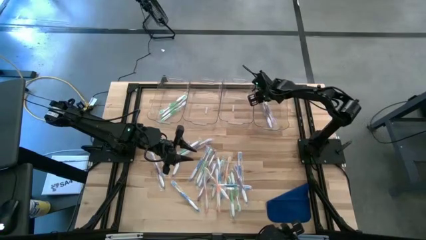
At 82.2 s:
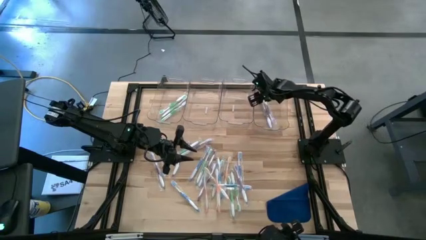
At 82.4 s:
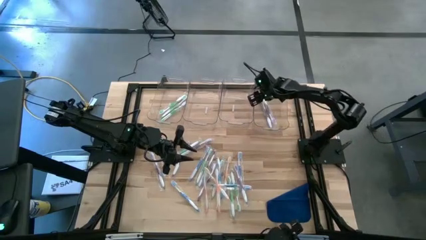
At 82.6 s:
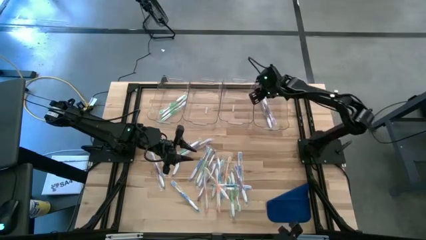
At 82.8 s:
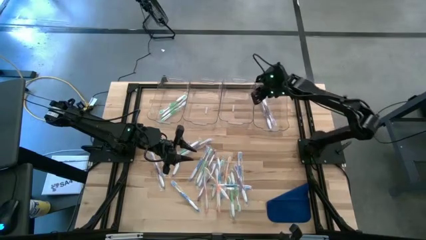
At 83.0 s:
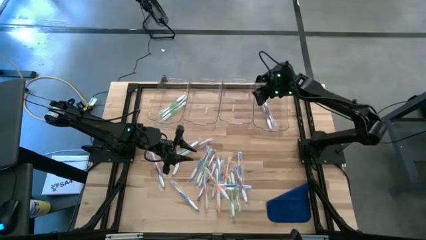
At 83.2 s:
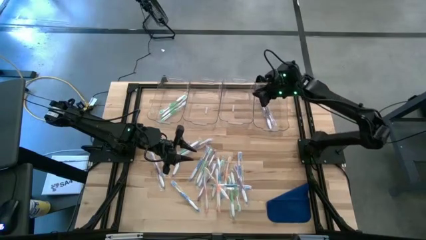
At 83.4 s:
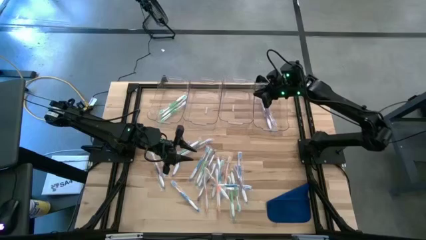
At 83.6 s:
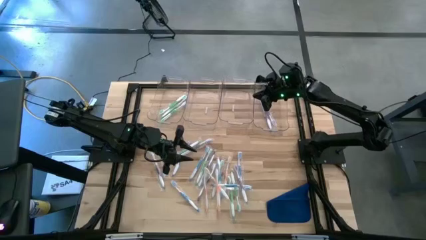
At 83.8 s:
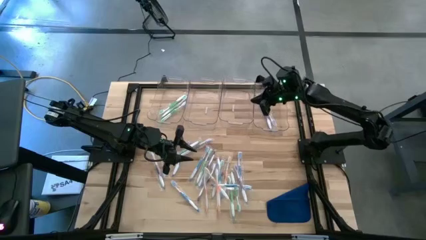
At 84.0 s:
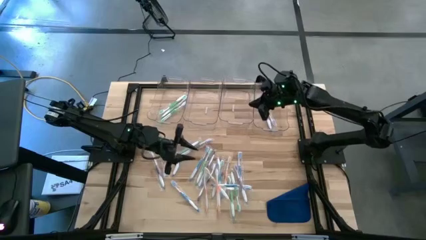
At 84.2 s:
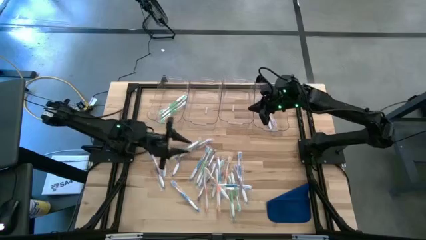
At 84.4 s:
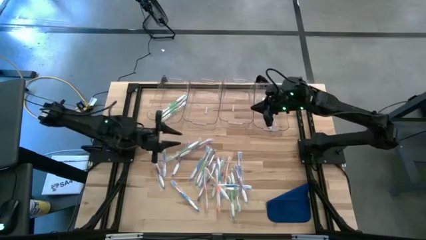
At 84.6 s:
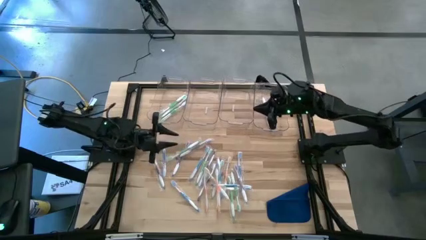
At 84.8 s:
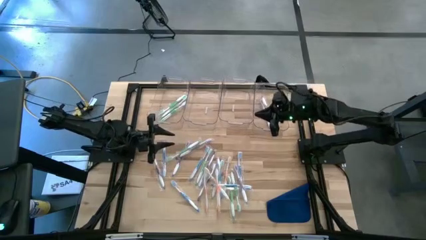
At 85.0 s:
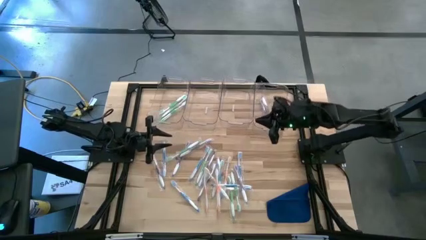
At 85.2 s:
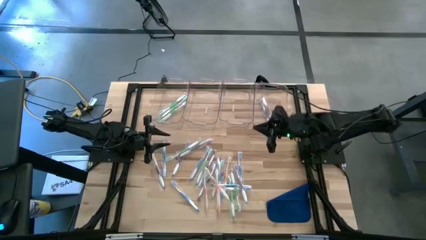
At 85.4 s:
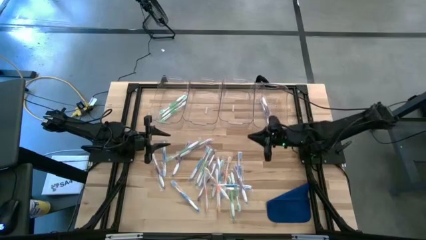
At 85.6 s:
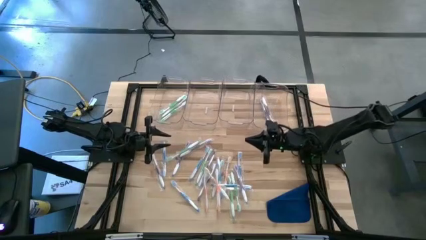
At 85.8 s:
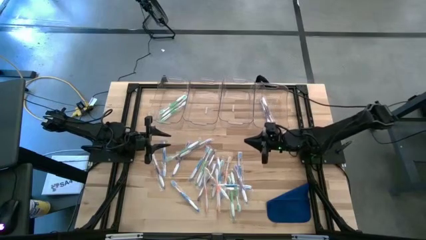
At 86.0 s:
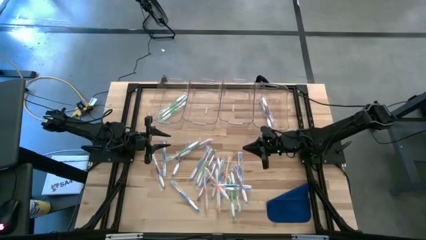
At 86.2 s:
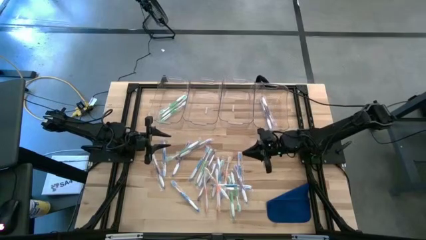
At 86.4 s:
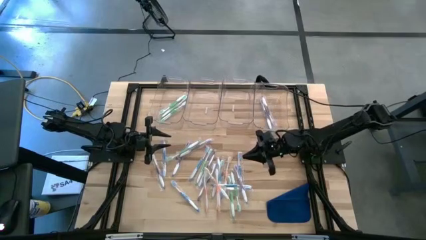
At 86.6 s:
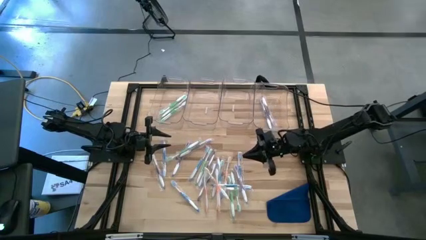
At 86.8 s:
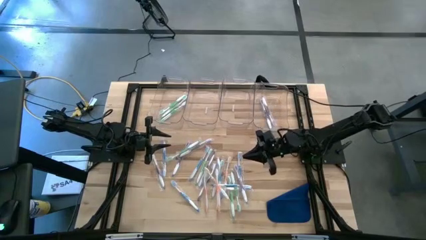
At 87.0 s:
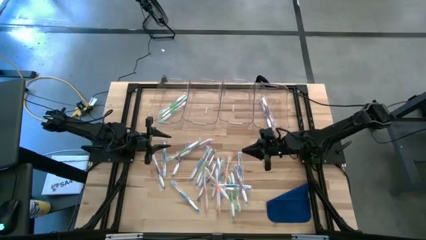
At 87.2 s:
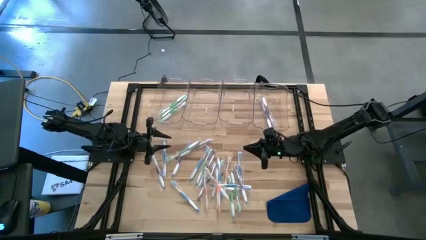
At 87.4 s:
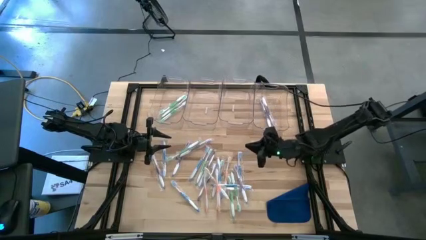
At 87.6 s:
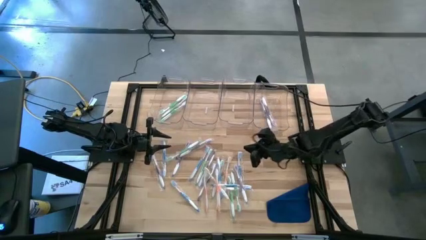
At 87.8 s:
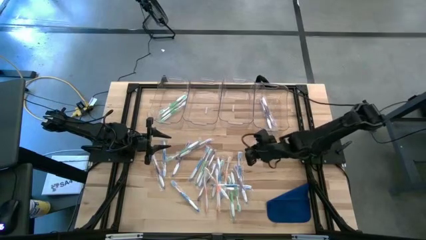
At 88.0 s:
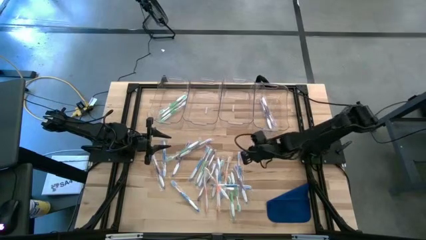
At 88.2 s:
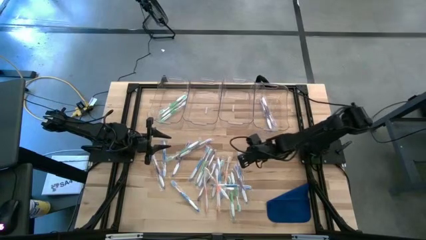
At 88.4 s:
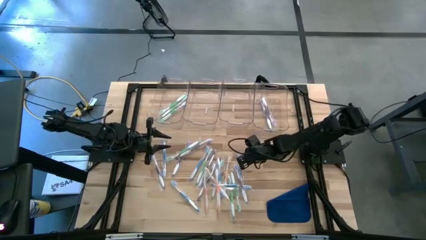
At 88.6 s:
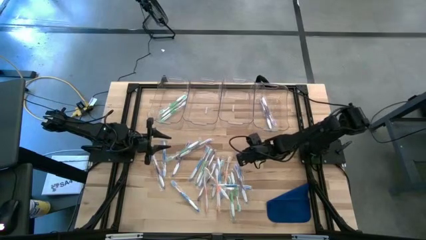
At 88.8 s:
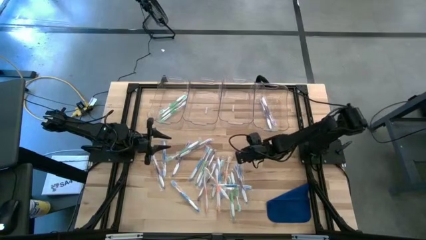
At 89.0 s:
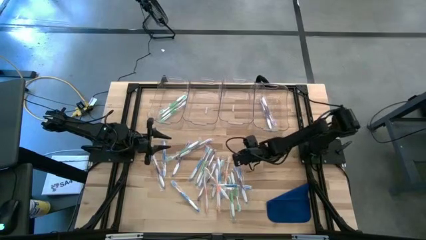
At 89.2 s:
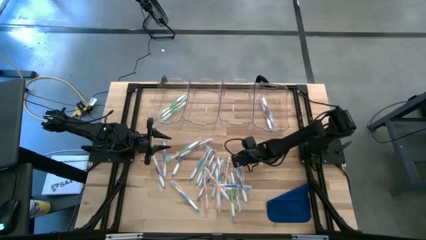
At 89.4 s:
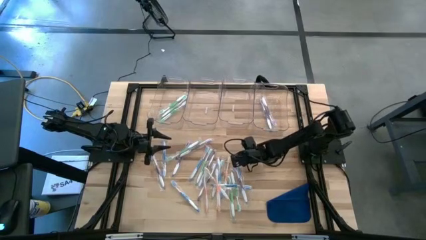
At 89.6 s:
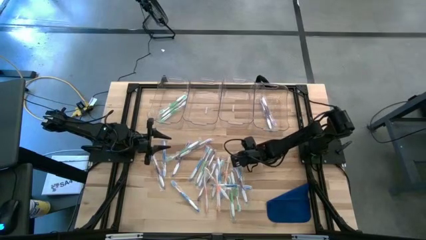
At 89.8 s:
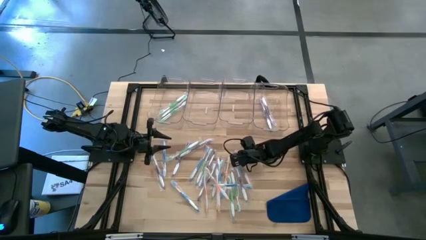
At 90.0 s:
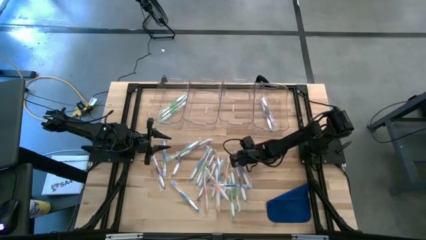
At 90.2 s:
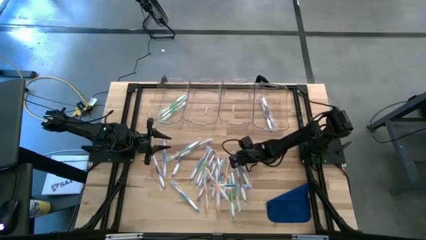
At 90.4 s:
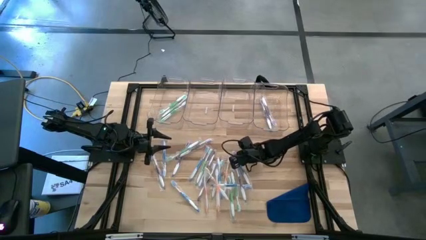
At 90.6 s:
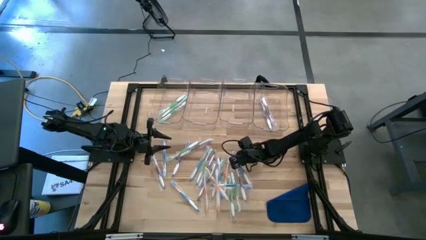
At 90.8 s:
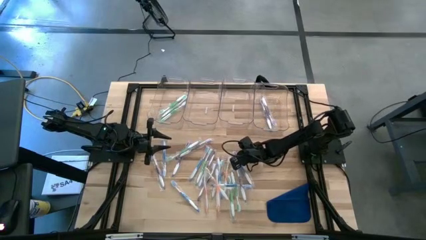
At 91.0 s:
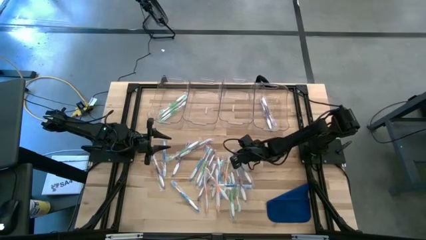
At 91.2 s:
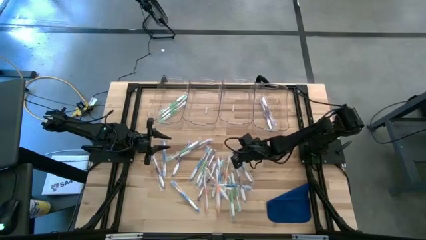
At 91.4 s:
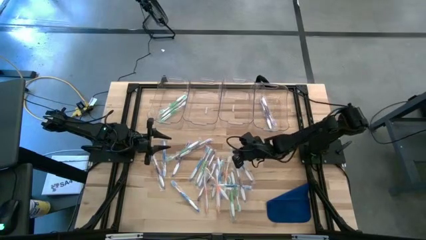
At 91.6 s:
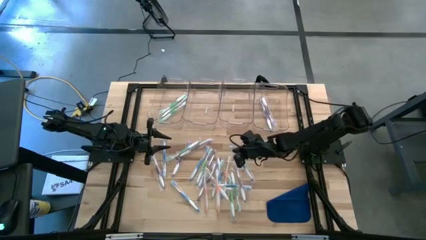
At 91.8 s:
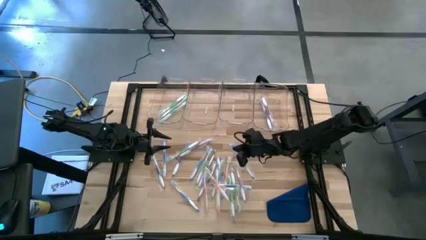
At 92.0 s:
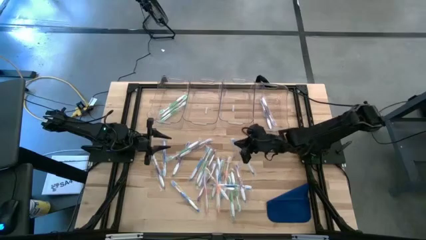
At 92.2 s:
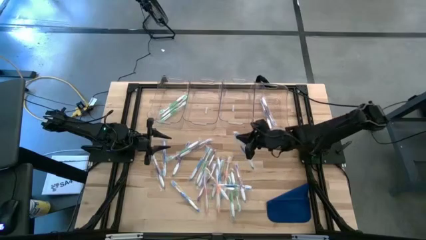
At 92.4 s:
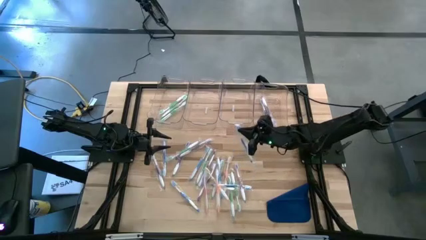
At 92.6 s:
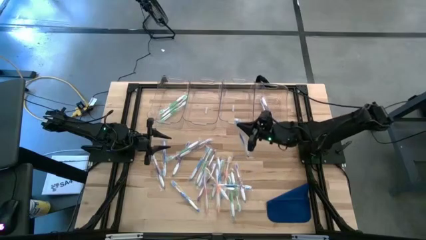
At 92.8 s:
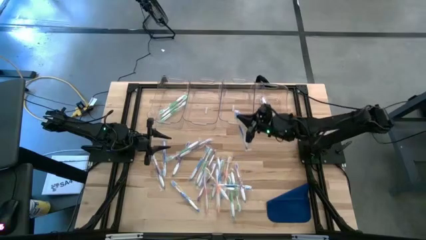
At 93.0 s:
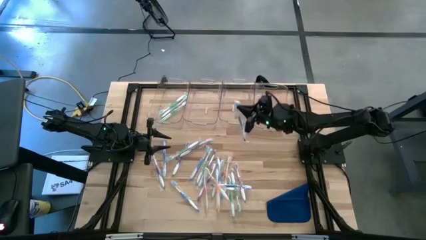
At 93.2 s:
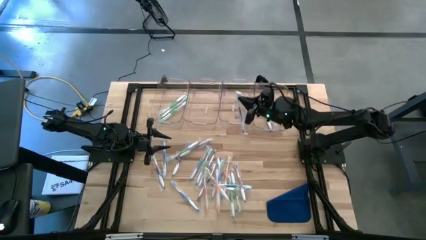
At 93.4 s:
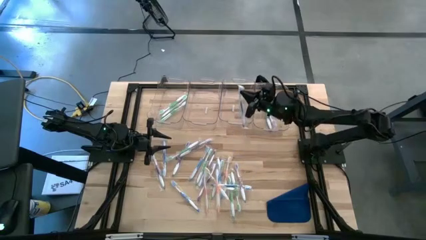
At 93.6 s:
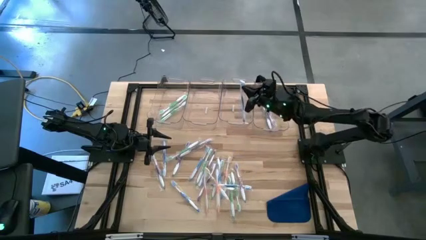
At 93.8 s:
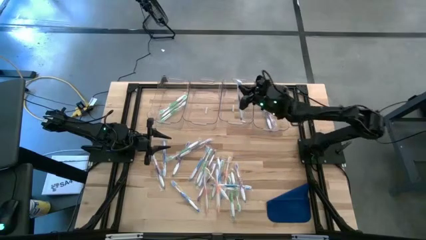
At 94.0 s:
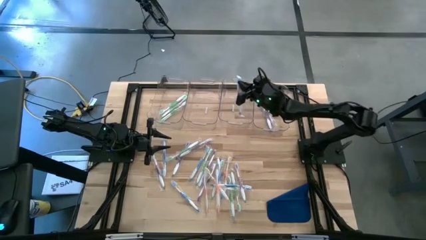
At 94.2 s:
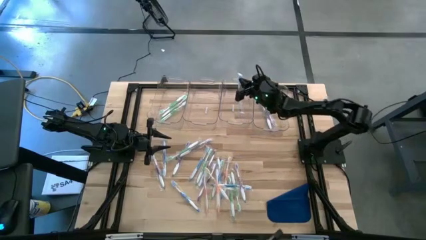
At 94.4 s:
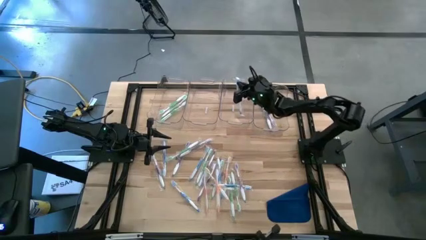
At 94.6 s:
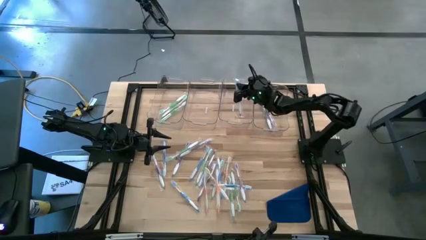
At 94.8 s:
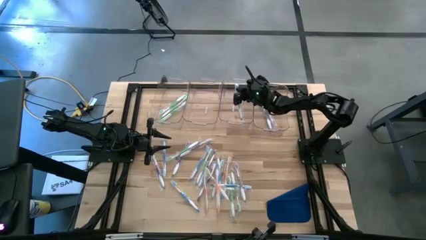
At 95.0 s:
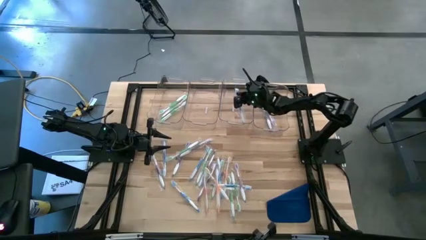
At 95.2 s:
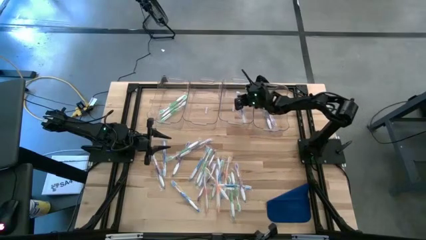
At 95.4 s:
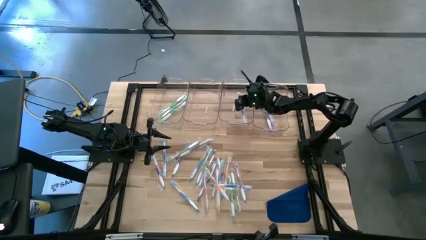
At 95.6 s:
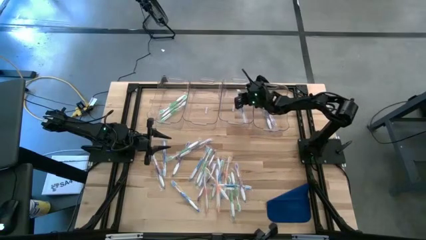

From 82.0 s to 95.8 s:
Task: Pick & Place Toothbrushes
Put the blue toothbrush into the middle right transparent bin

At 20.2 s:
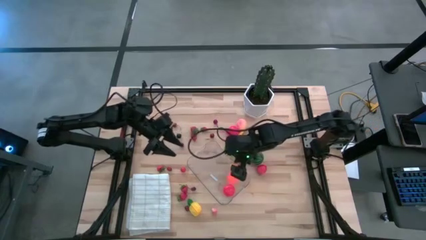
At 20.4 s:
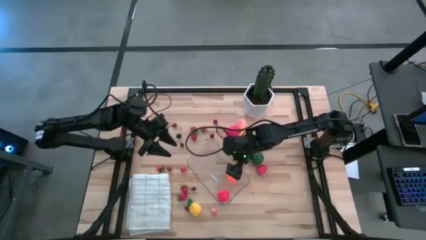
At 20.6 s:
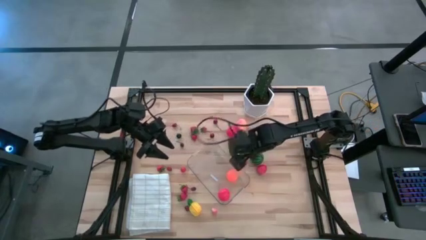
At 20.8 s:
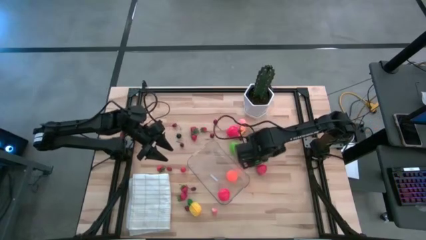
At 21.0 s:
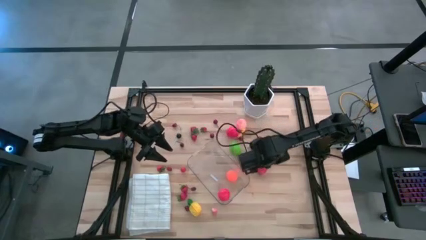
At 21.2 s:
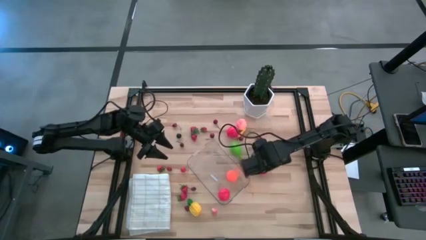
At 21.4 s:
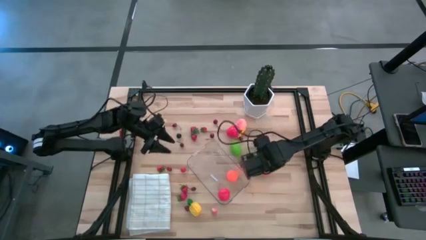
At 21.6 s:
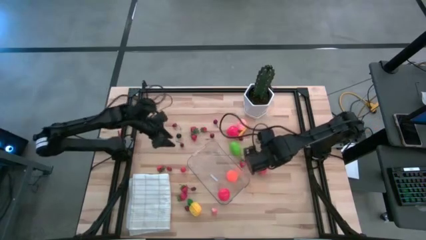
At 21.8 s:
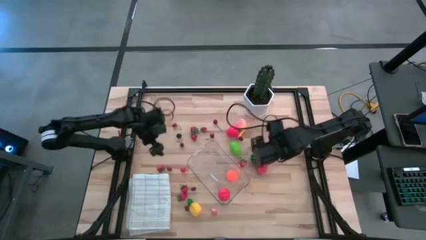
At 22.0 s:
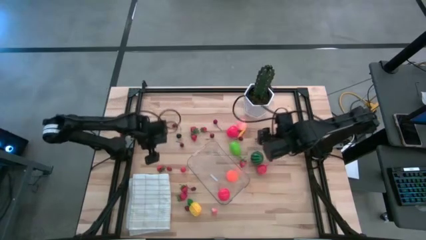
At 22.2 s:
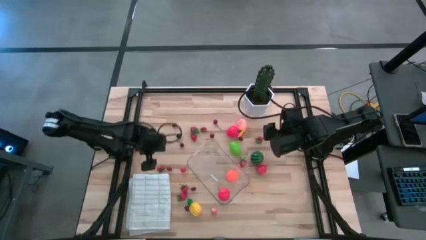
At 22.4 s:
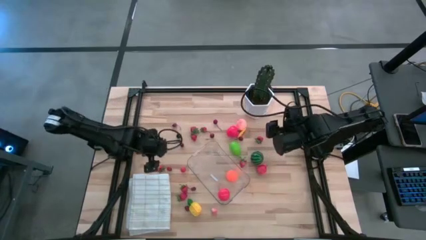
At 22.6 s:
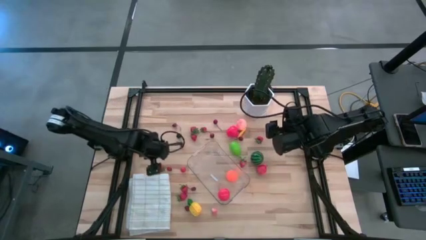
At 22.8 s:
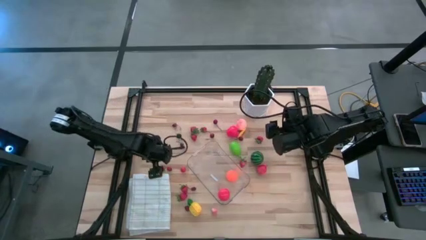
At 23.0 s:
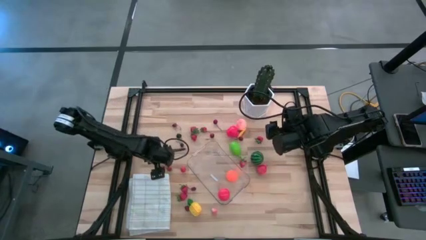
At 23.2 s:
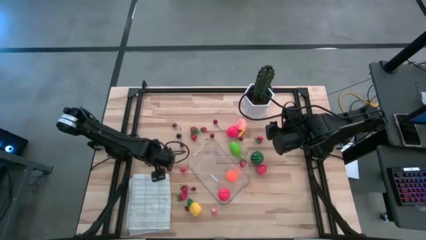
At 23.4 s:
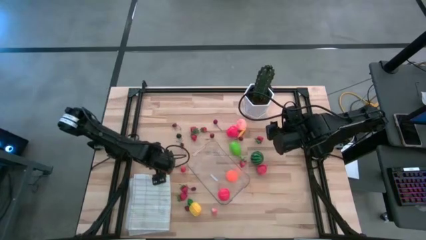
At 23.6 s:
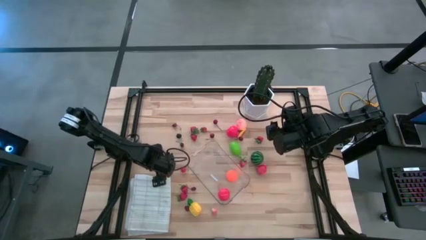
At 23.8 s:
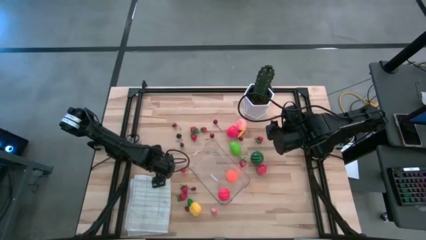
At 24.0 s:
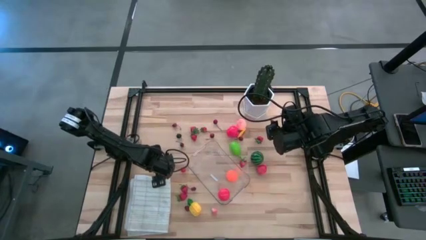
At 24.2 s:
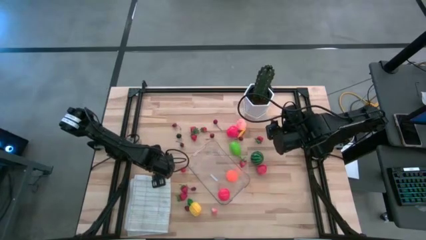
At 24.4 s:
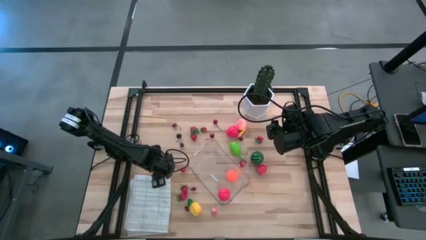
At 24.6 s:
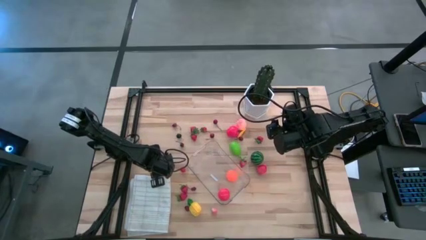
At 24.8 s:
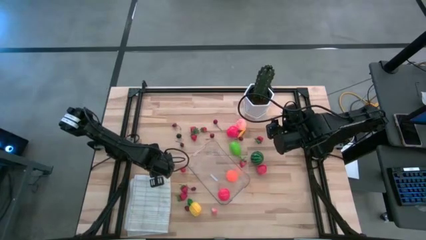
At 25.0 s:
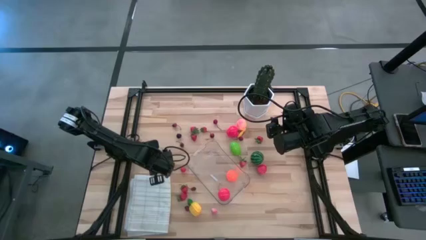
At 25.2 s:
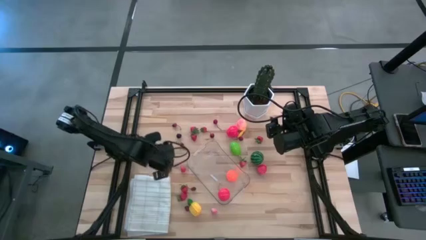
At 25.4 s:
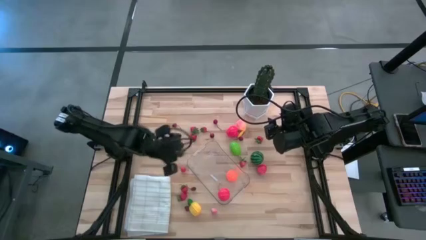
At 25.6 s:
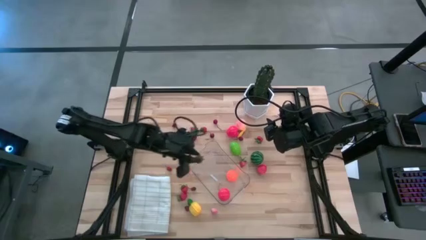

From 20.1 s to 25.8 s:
Task: Pick and placing Produce into tupperware
Put the red strawberry into the transparent bin
